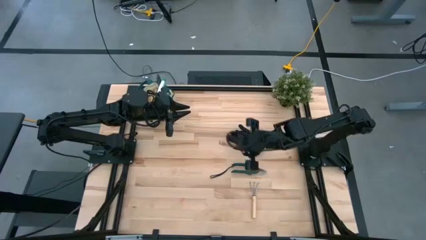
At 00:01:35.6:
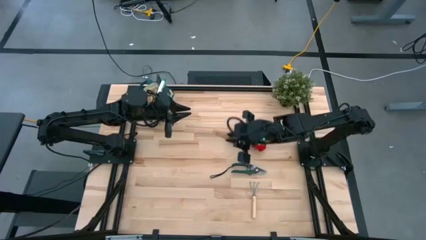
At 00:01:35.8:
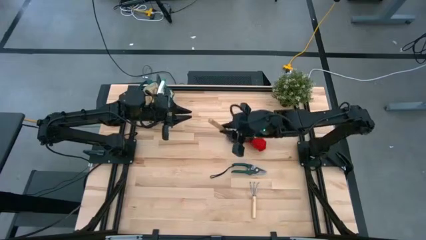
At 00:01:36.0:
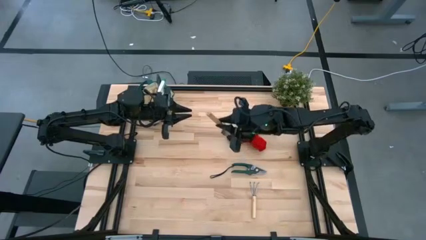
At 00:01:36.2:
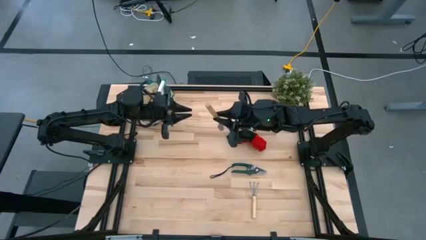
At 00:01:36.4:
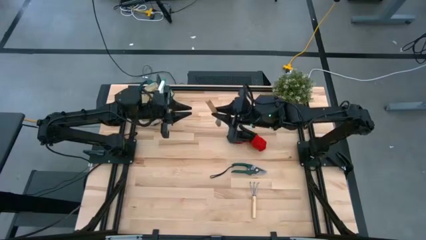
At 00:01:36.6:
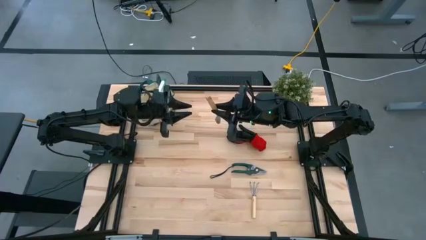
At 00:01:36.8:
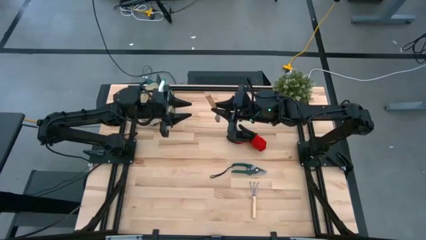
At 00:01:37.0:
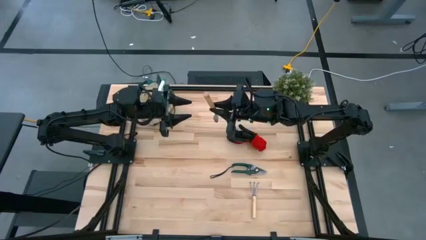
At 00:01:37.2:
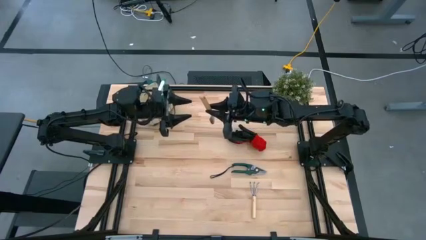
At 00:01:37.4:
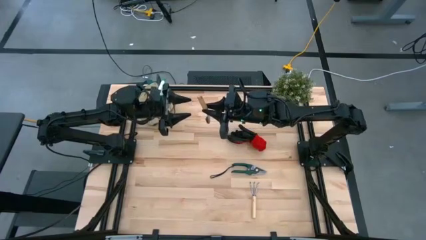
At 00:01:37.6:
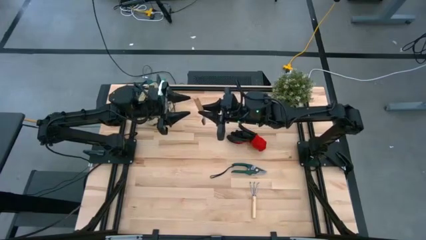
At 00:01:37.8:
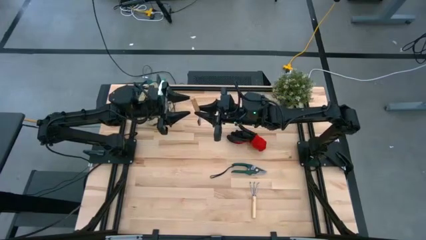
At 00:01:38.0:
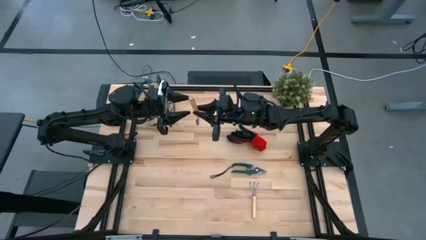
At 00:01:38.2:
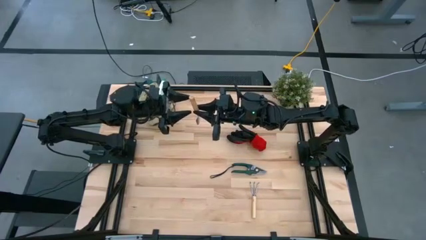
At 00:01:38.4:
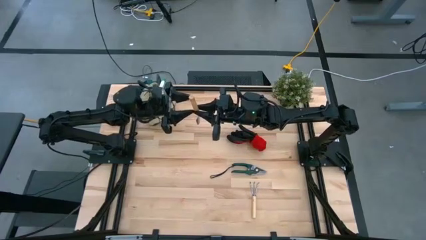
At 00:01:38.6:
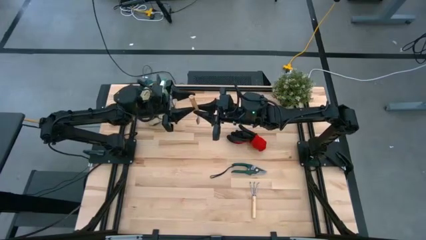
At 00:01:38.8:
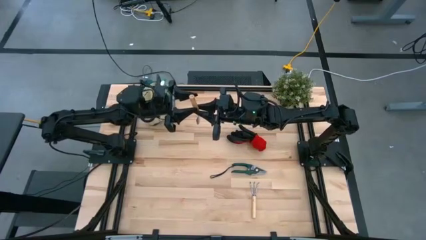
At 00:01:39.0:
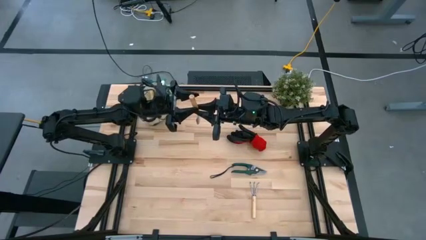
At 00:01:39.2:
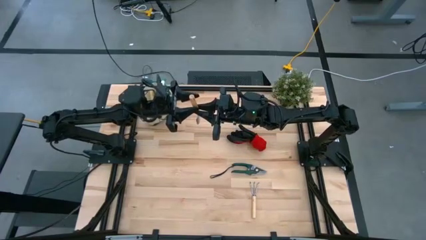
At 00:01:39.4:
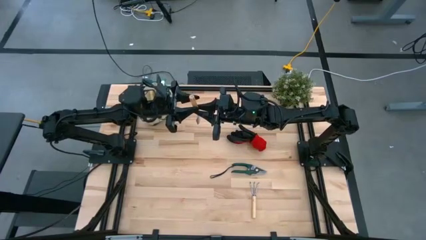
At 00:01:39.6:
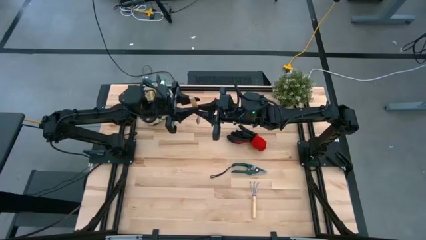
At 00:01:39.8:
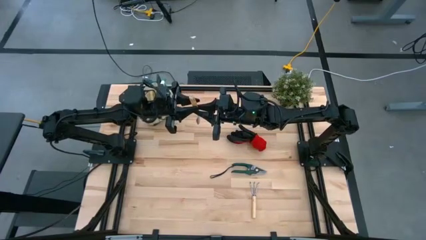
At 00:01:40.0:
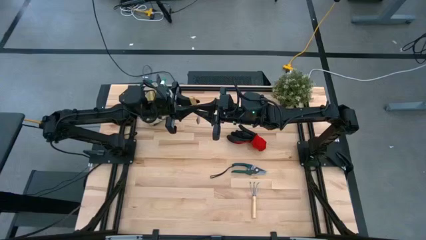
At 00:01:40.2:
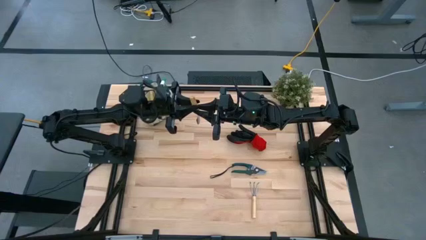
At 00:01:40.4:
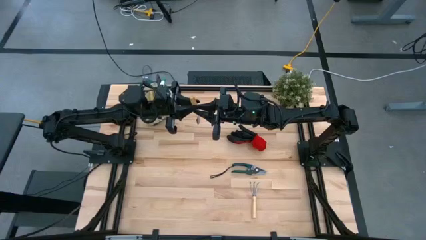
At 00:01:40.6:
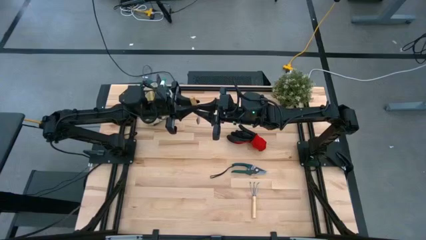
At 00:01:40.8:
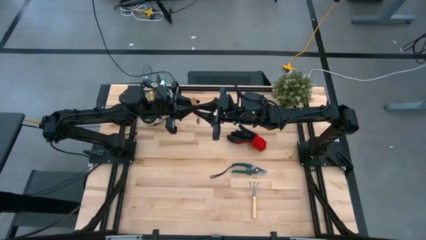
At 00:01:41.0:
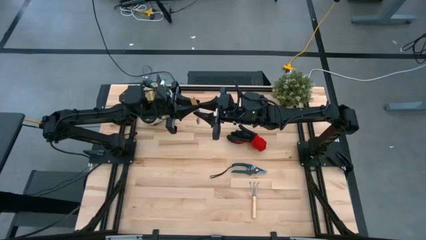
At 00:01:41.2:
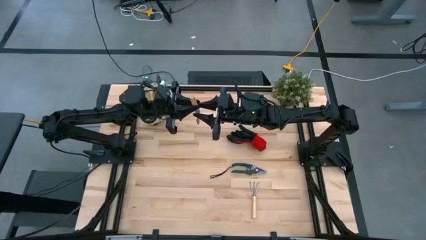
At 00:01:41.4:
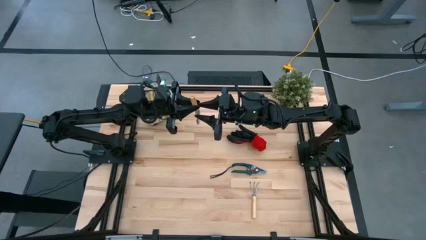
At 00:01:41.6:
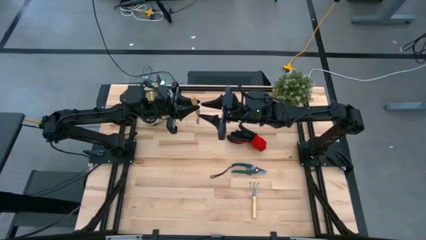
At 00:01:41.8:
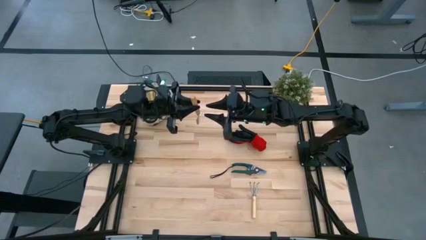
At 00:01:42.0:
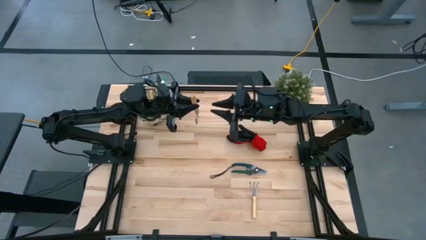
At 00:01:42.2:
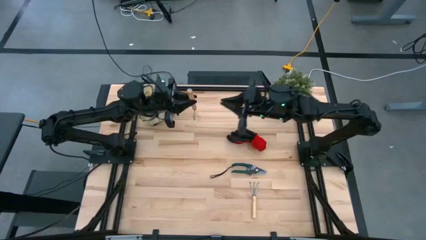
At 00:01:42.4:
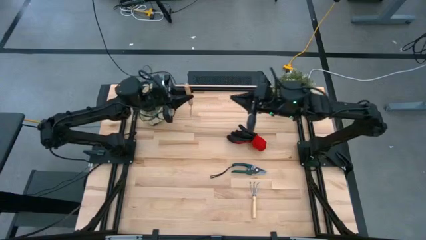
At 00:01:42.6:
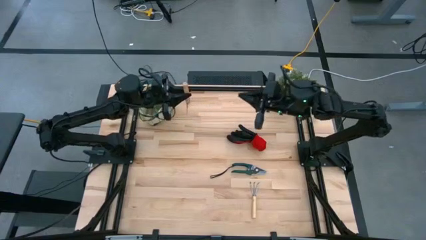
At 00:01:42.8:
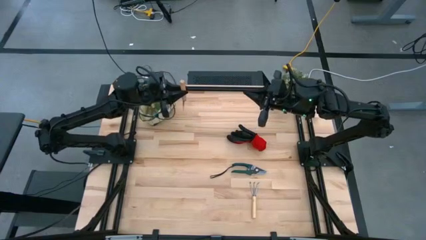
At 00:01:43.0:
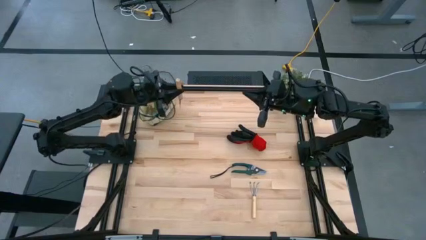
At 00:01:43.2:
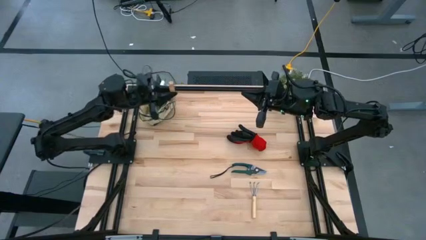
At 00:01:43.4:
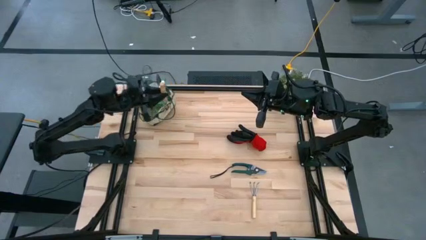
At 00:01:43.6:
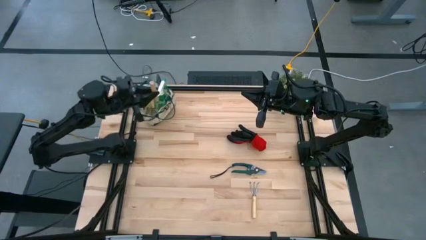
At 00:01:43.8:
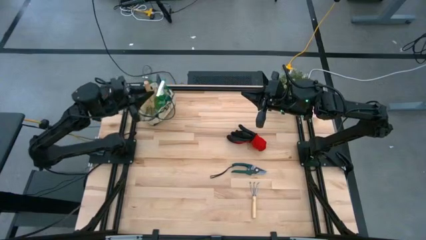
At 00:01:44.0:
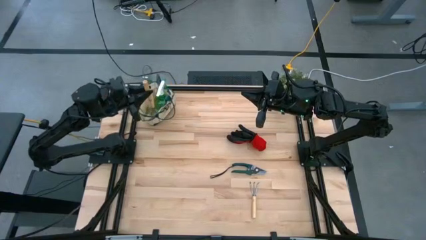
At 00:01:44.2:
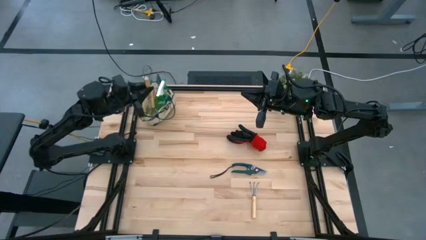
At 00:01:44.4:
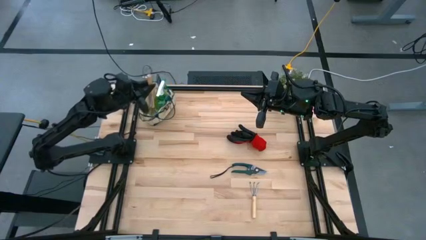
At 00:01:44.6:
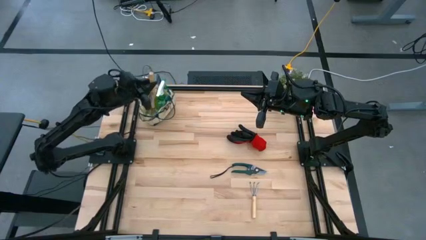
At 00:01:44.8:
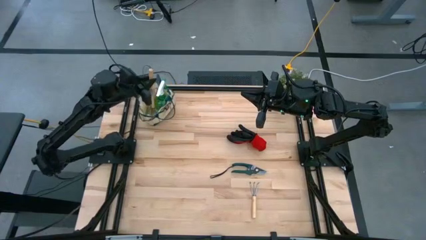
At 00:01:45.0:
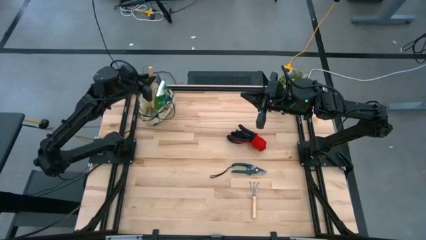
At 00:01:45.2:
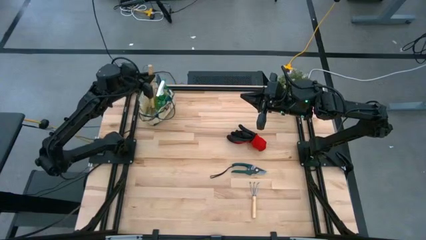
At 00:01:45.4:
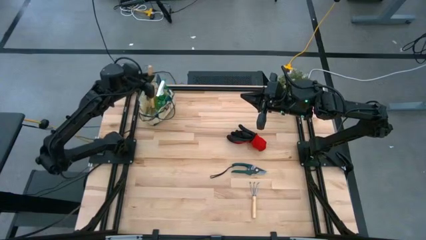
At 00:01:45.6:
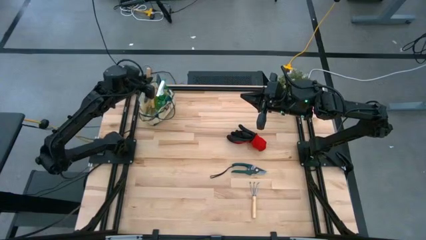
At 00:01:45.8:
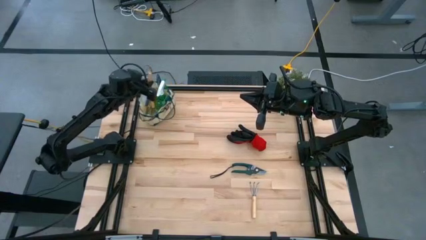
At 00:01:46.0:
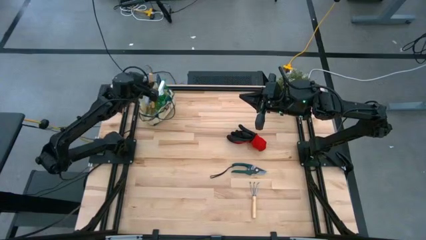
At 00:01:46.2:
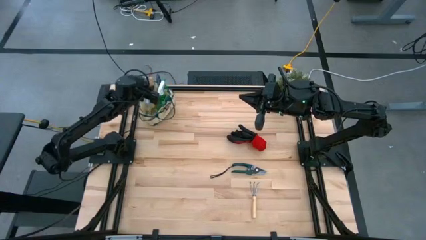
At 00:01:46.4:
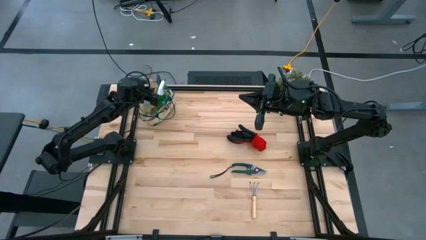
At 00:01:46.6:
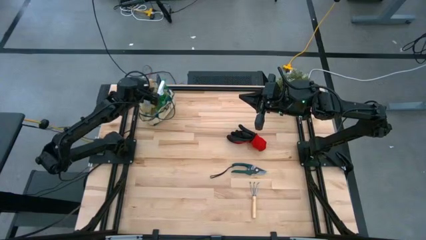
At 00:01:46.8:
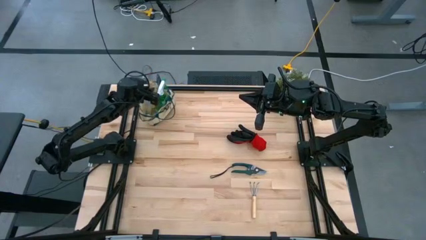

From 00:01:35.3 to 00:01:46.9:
Task: Pick & Place Garden tools in Gardening bag
Put the brown trowel into the gardening bag

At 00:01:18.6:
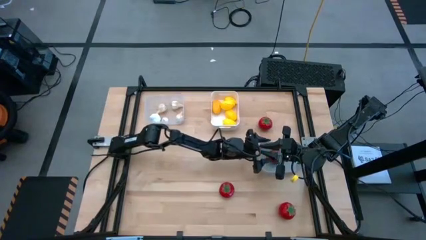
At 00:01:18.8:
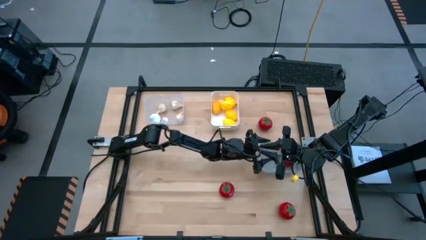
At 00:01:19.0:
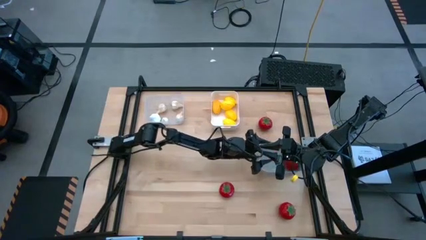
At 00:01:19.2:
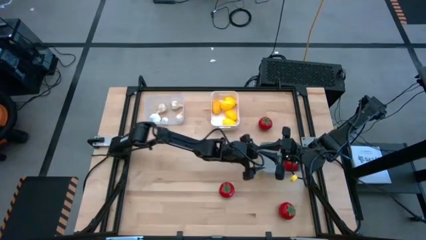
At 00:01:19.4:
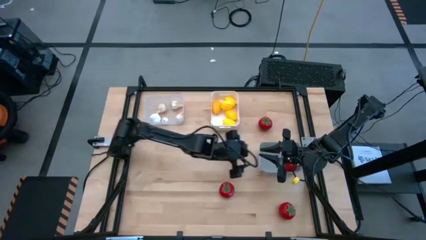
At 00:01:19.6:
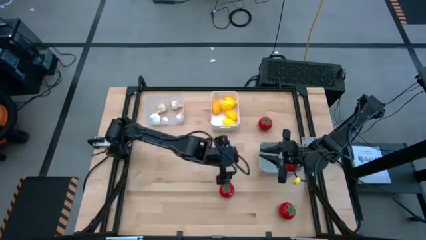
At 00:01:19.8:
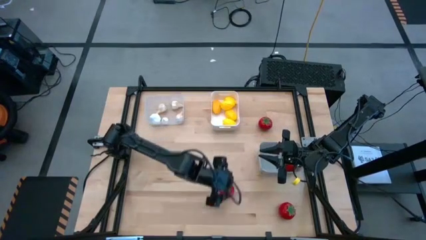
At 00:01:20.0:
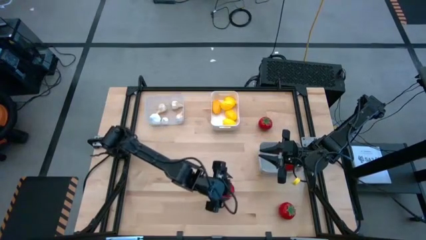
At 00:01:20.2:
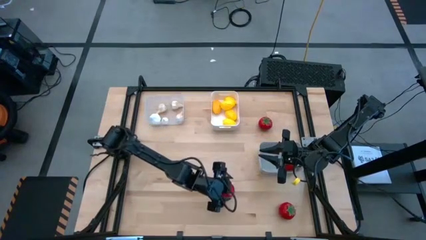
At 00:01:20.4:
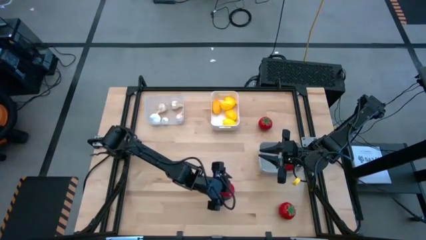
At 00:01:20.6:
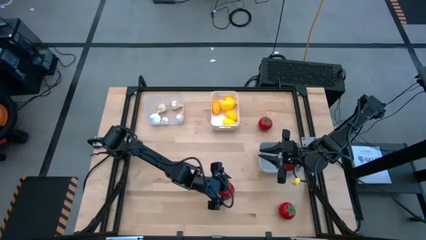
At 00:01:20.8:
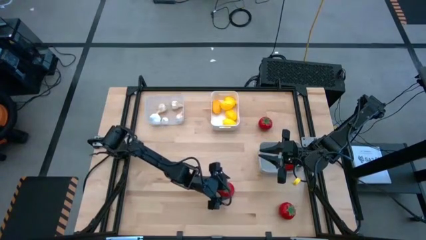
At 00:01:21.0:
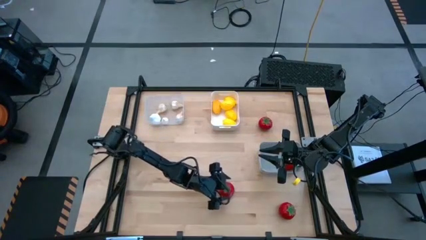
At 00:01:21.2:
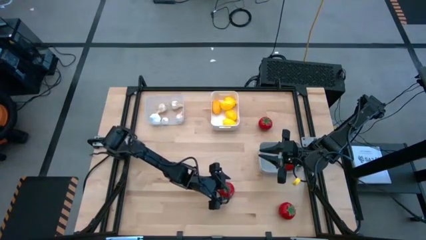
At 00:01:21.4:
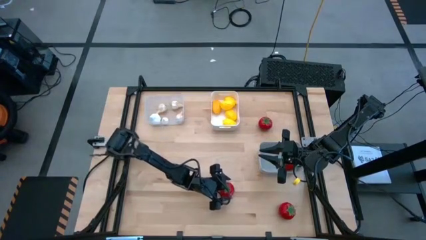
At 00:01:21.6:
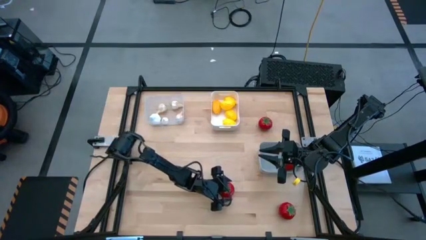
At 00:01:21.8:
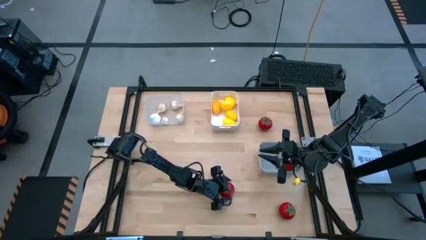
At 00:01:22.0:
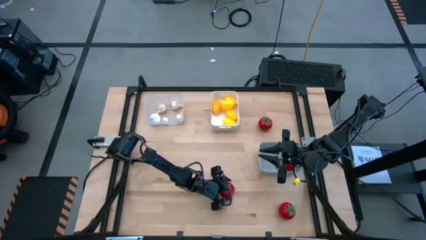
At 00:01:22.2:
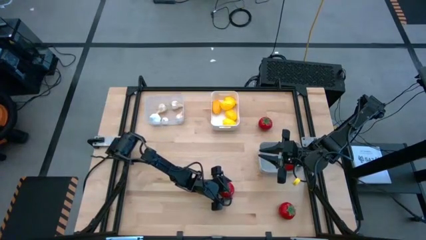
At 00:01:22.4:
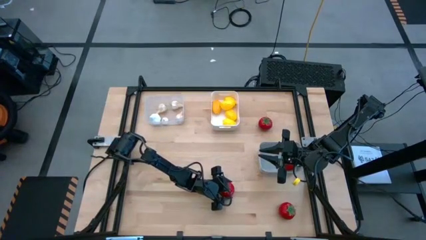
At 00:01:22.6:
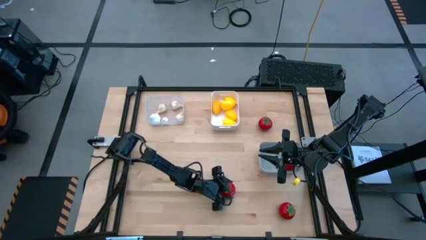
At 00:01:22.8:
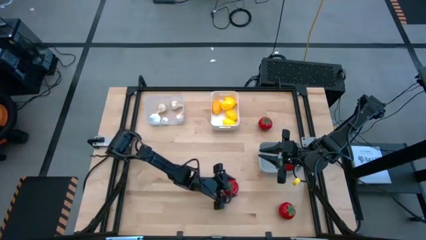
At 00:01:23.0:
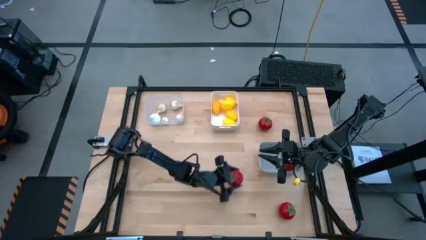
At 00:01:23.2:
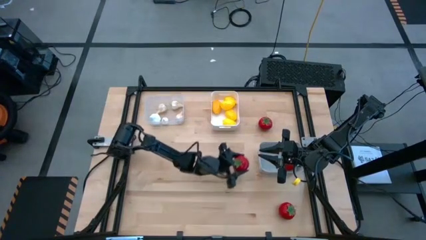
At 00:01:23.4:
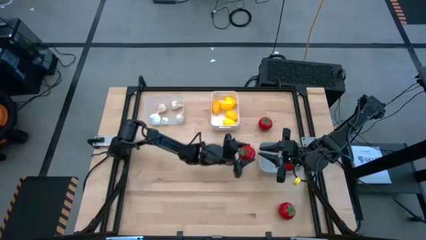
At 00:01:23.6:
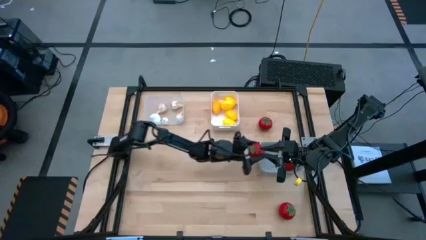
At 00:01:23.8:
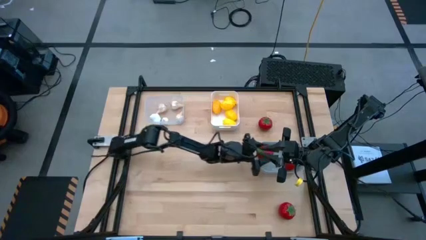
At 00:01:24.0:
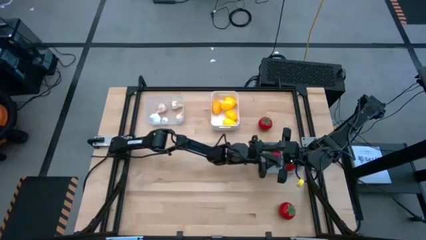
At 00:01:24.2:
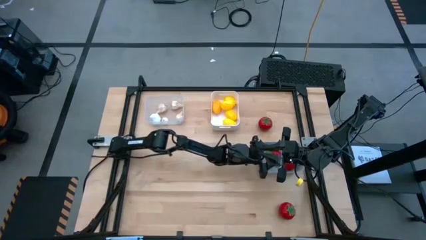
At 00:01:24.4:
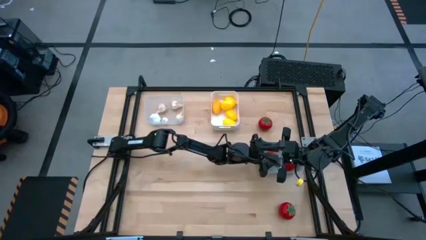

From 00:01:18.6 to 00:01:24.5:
Task: Sort produce into baskets
Put the tomato into the gray bin
